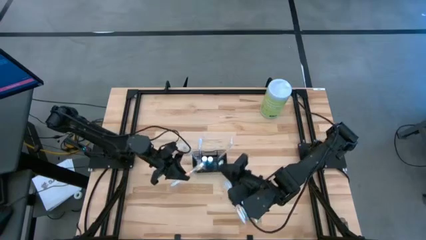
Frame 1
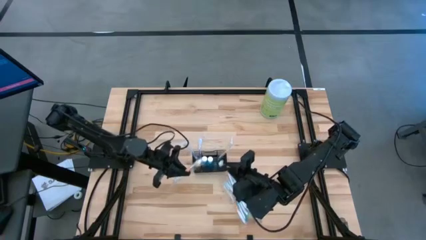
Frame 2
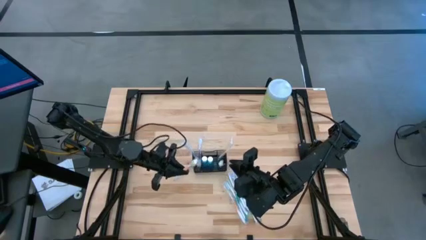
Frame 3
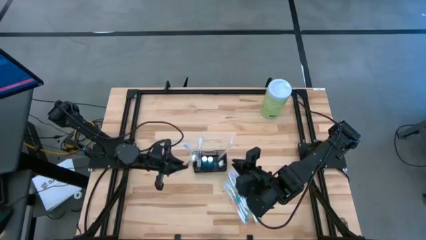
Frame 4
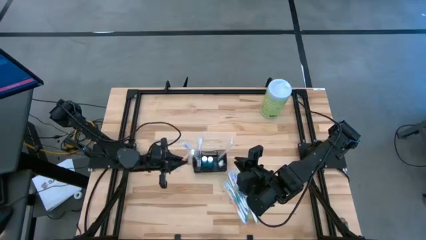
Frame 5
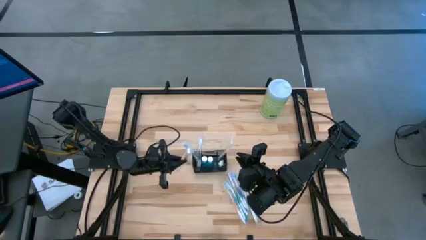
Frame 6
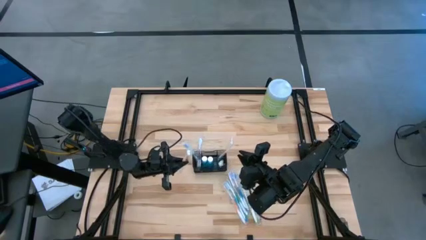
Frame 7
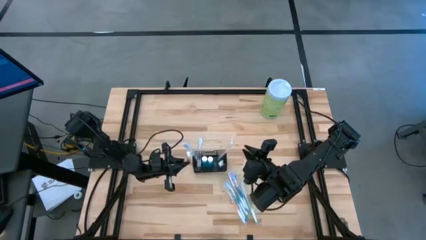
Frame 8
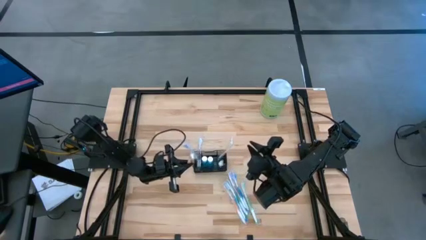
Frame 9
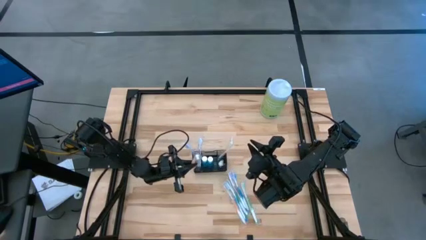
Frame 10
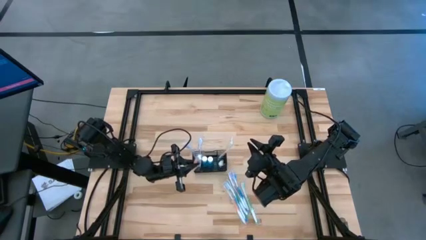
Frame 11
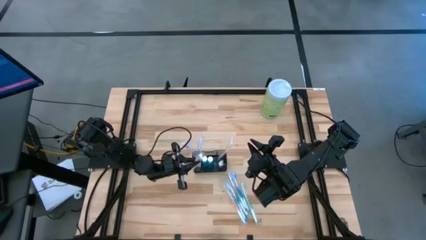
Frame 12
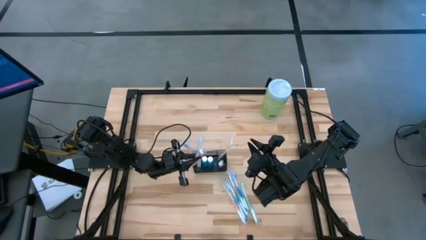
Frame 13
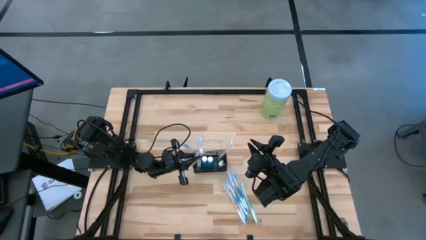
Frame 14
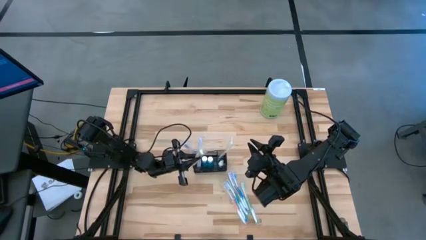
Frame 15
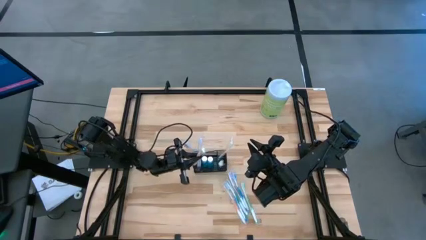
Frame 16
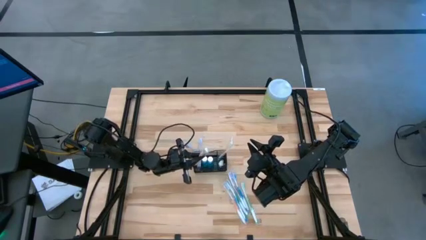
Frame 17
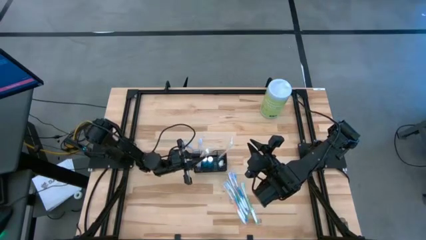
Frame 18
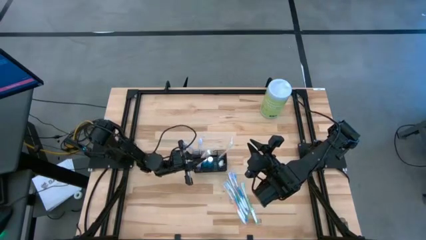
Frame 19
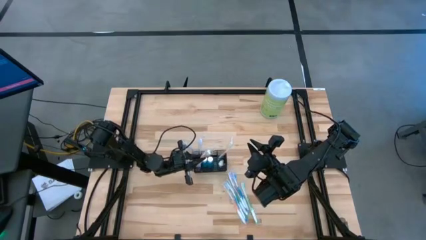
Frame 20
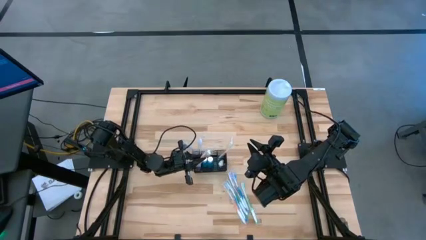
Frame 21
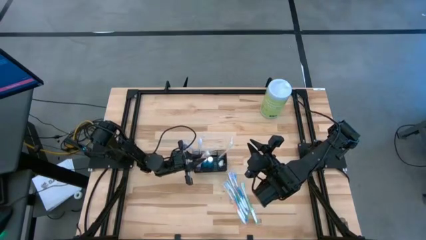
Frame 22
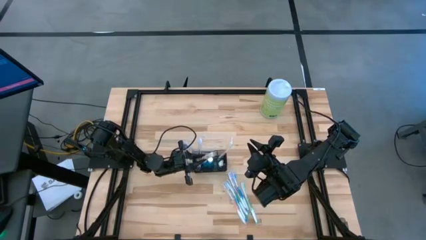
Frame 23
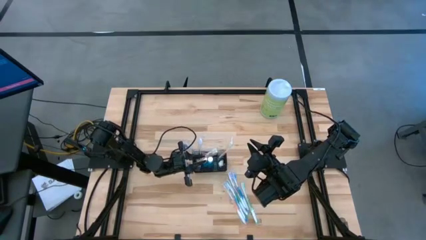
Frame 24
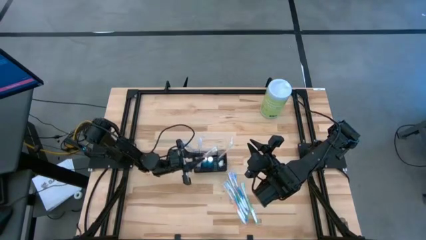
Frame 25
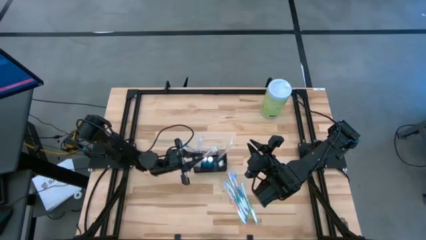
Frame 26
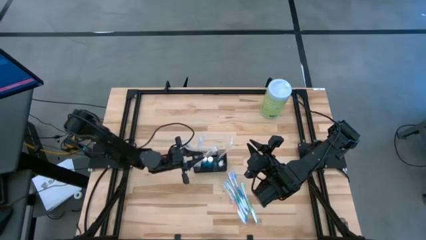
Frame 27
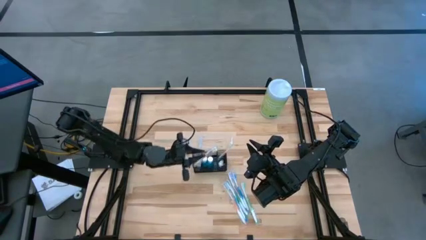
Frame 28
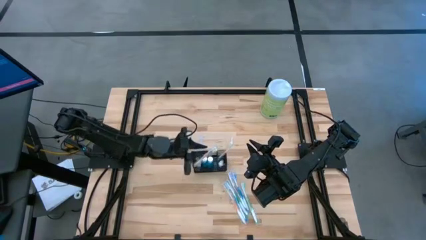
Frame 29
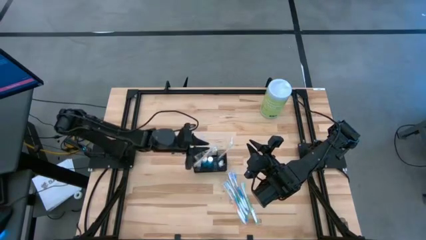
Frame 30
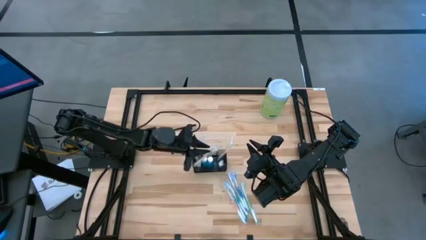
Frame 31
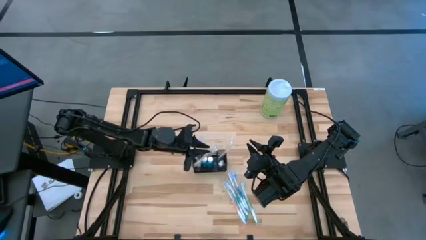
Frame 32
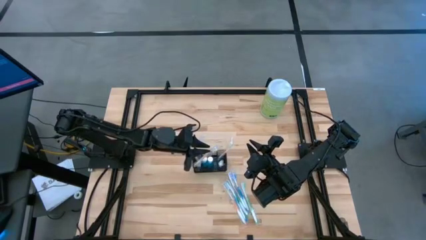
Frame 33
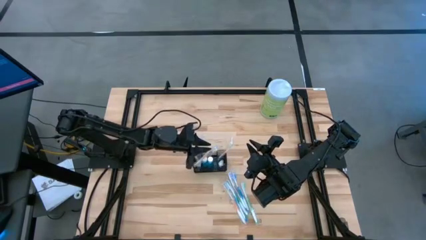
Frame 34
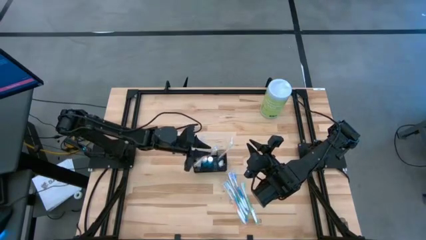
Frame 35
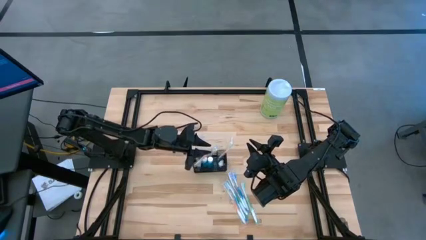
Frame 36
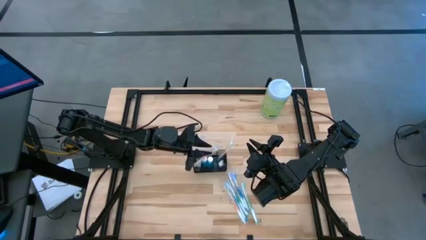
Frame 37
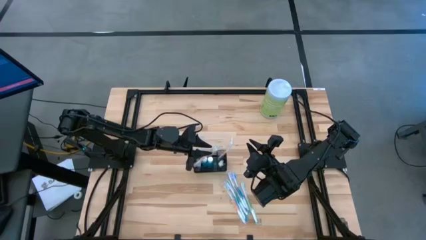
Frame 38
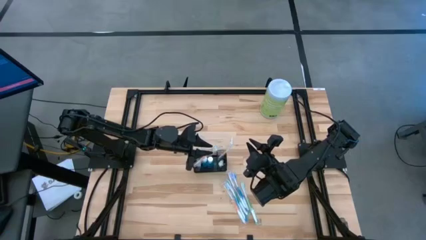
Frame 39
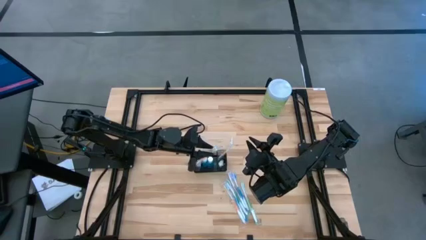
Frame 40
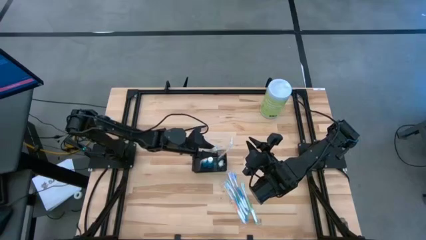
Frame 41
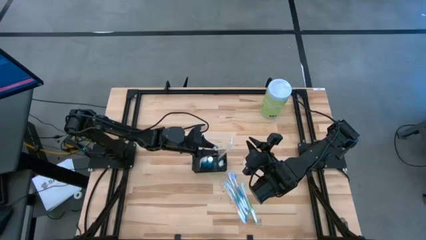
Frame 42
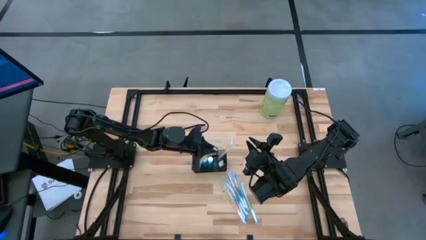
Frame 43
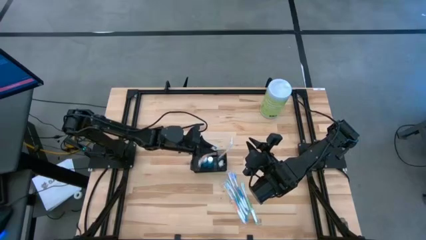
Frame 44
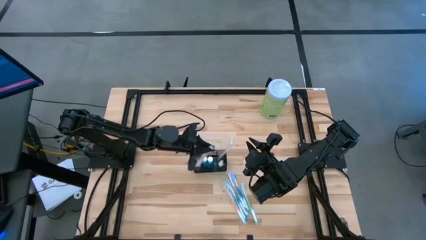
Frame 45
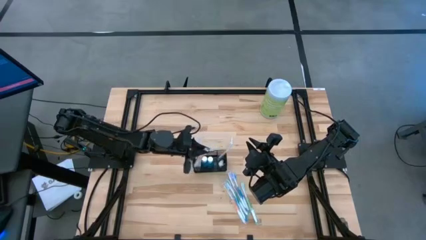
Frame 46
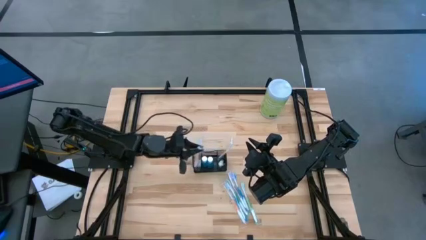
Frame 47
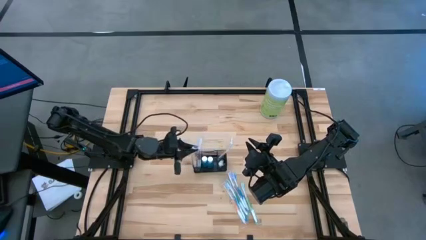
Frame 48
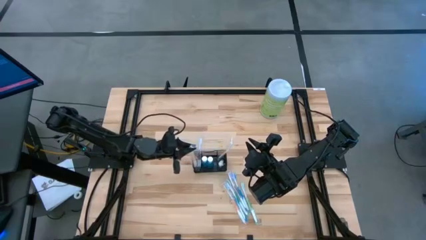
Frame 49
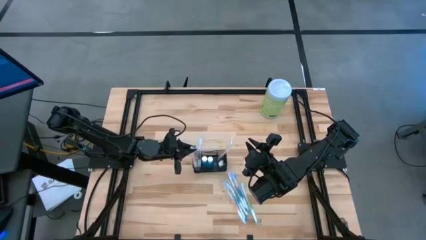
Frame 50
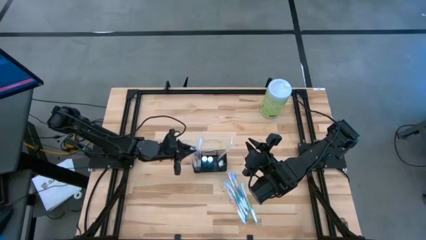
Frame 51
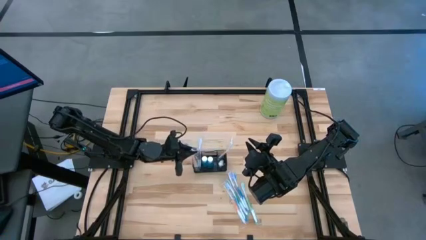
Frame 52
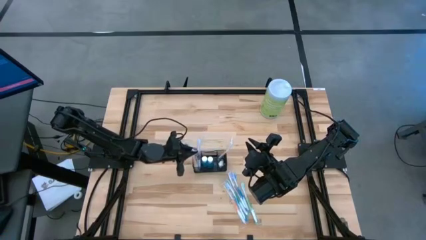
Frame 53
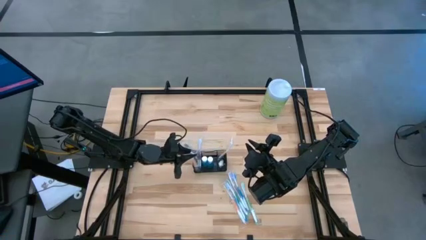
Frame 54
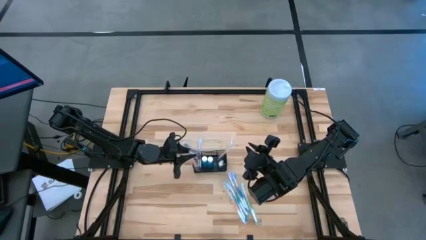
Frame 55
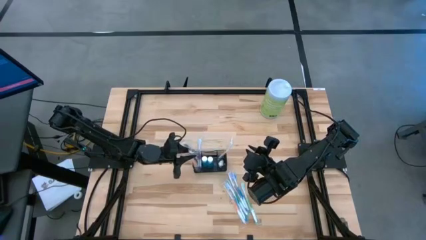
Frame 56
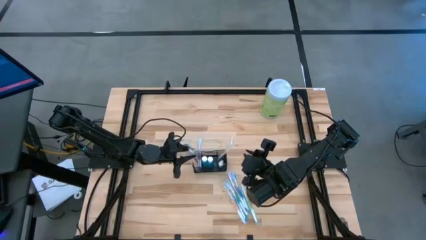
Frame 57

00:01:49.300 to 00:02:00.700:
Task: Pick & Place toothbrushing station
Put the orange toothbrush into the mesh

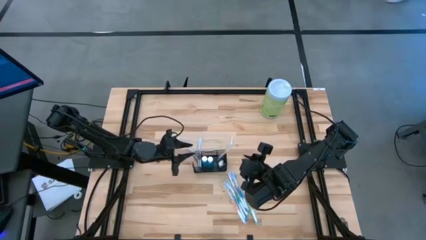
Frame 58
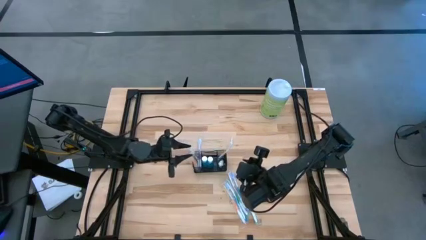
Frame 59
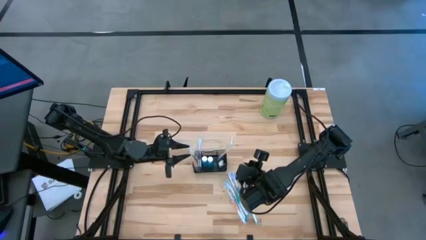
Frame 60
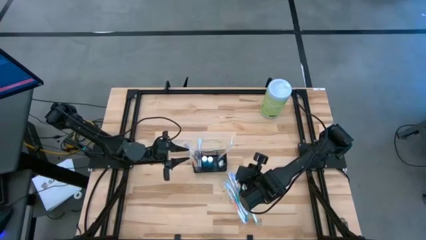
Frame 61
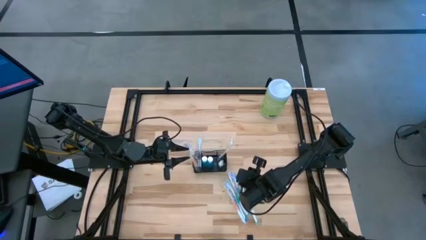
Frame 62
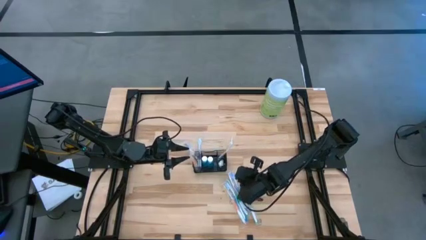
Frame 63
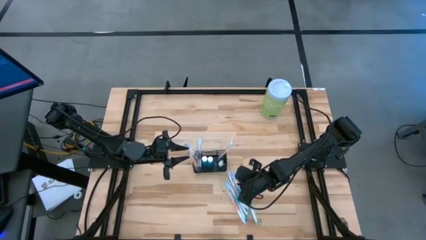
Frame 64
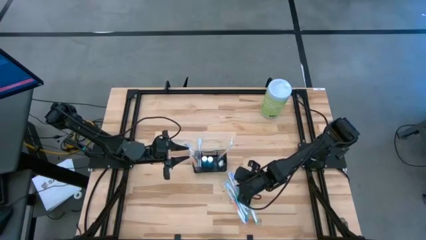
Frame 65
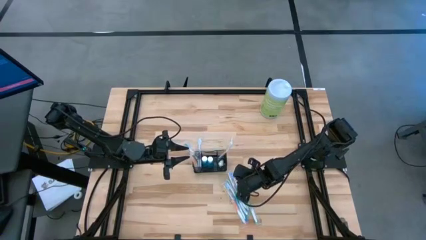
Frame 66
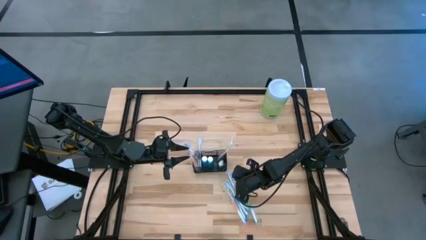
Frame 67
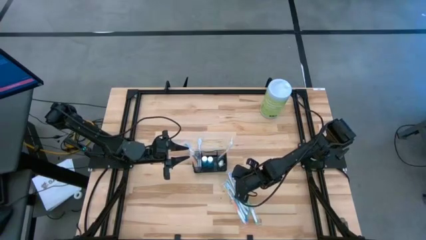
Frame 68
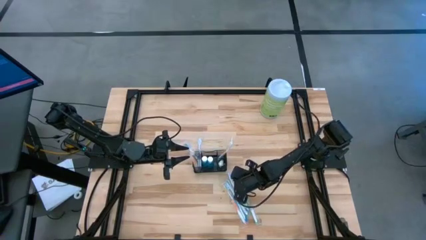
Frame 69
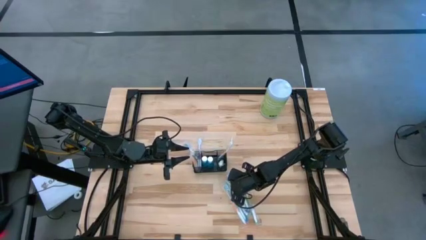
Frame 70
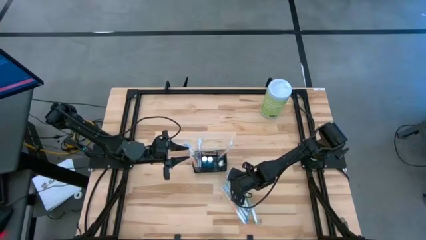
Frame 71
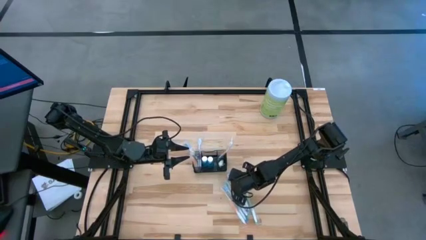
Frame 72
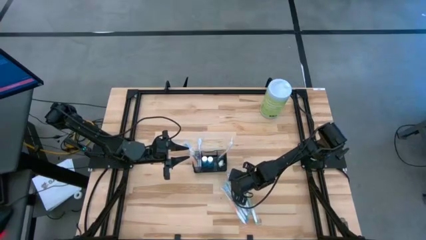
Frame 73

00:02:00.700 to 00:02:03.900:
Put the purple toothbrush into the mesh

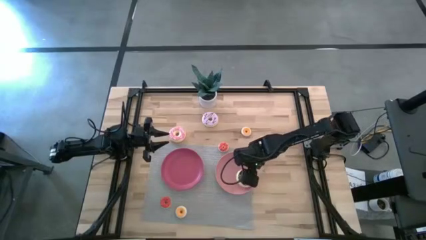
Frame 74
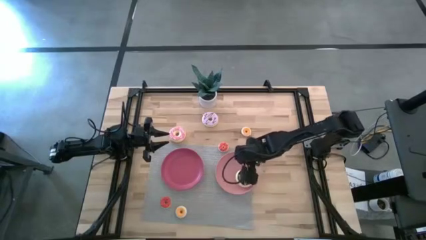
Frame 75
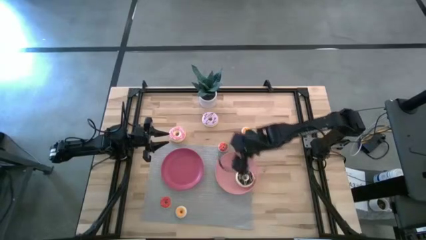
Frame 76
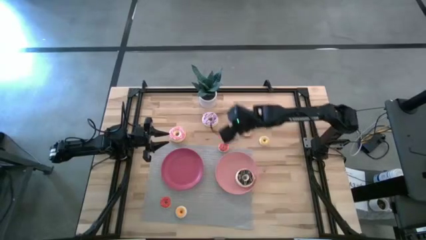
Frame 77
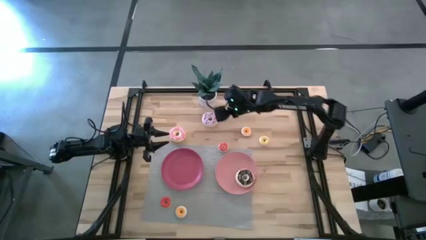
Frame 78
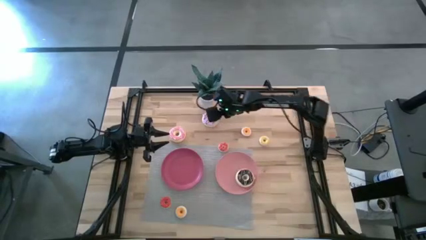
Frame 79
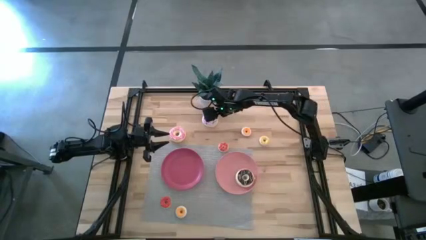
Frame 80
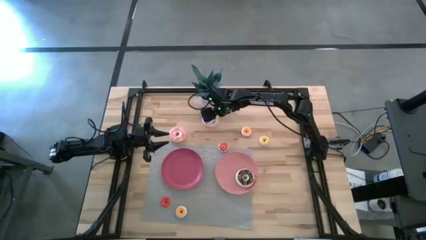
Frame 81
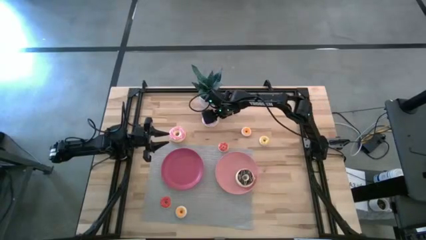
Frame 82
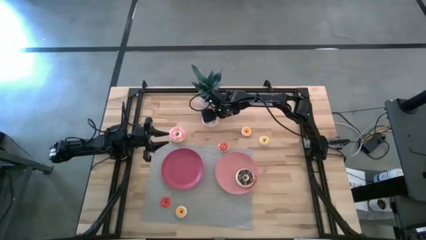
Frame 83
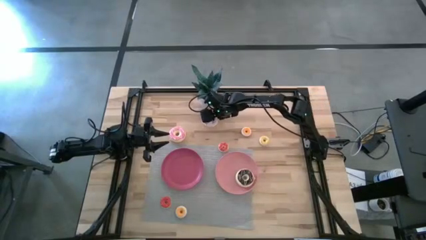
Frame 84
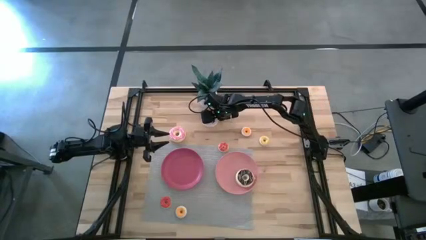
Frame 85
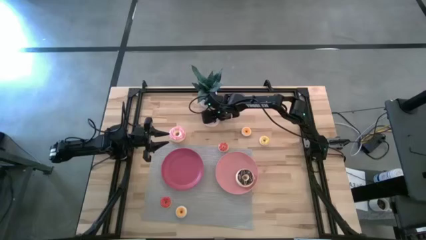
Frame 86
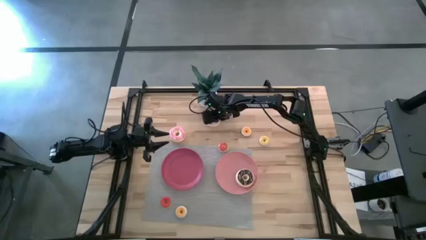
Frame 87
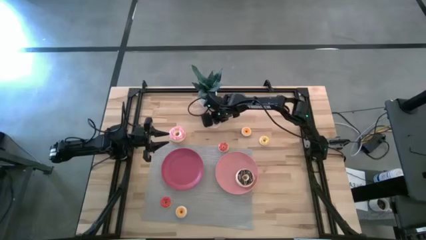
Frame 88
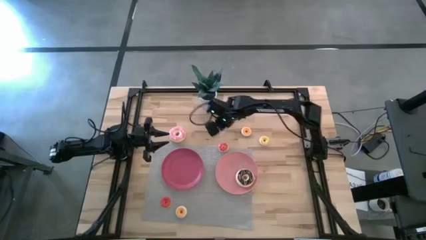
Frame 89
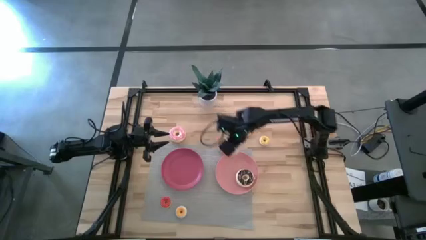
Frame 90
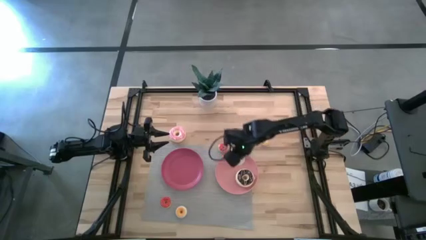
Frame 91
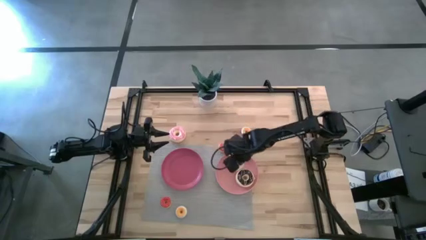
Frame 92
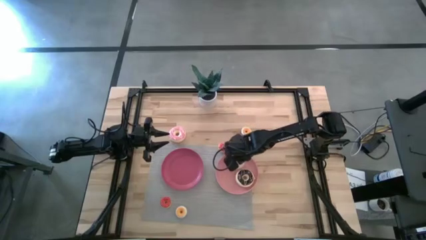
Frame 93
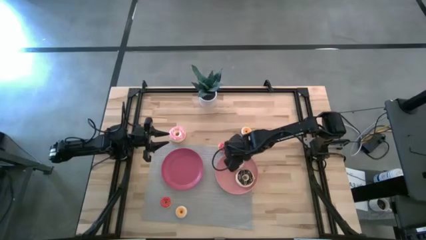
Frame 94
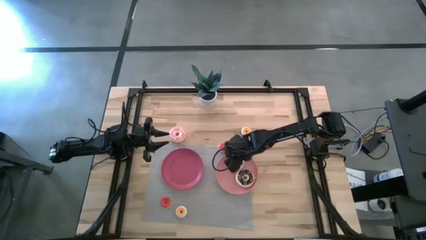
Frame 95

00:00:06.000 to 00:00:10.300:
Task: Pick & Place donuts
Put the large violet donut on the light pink plate
